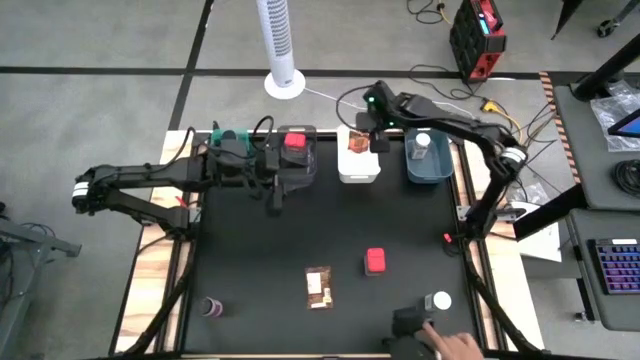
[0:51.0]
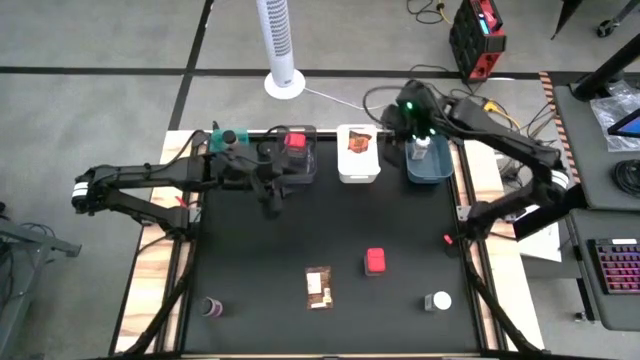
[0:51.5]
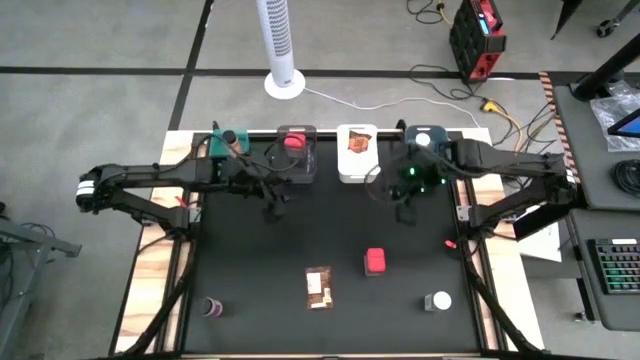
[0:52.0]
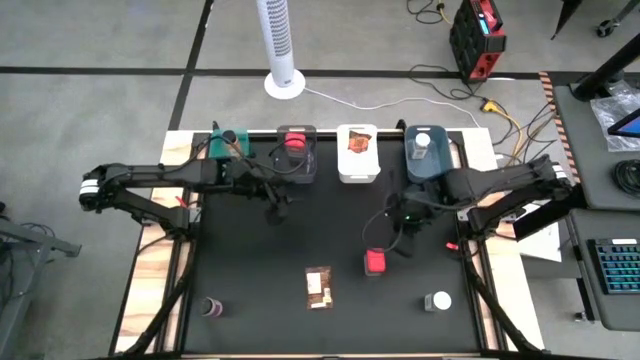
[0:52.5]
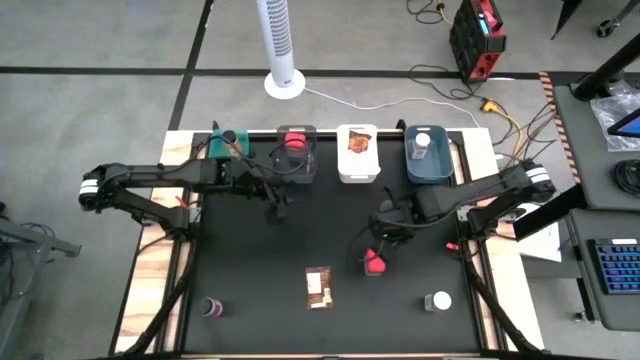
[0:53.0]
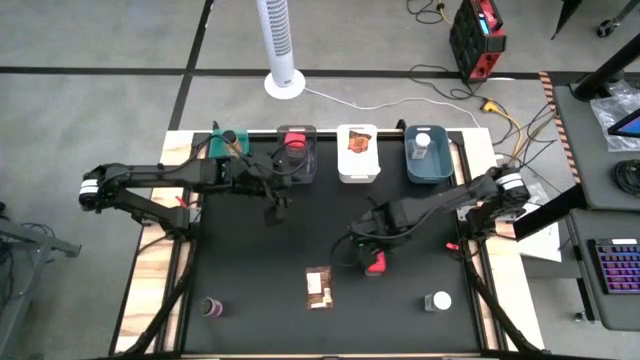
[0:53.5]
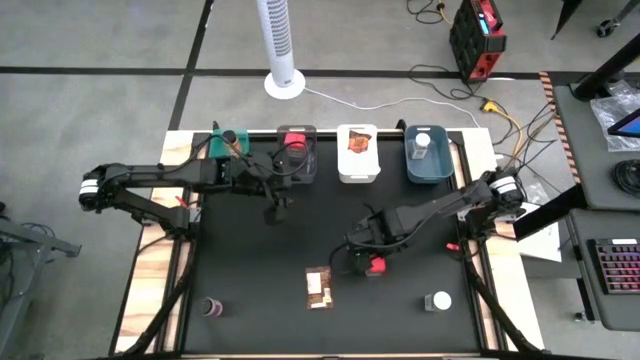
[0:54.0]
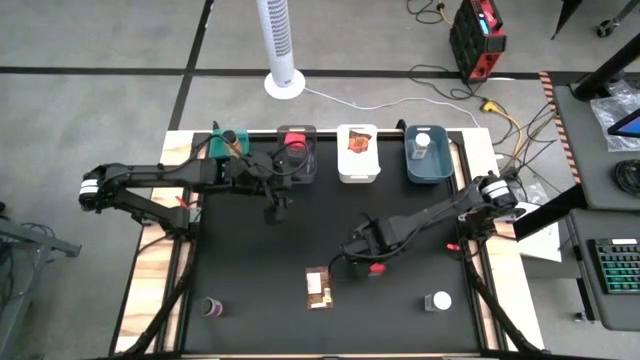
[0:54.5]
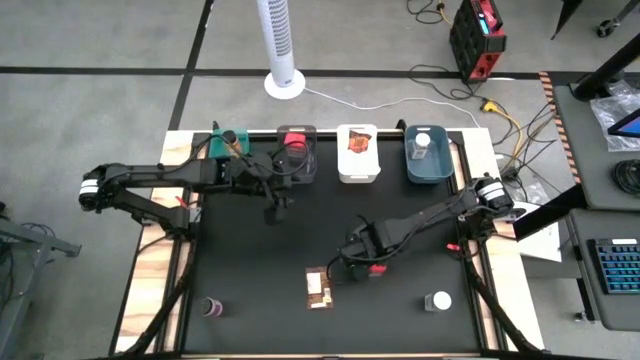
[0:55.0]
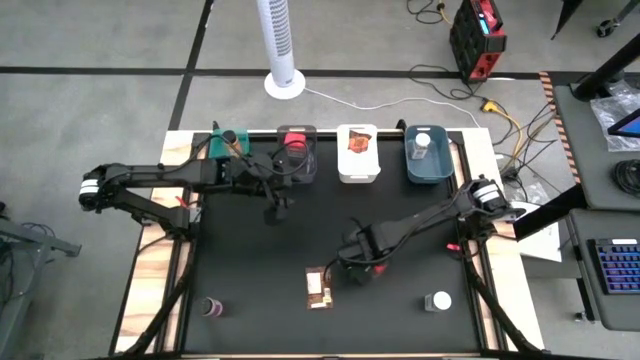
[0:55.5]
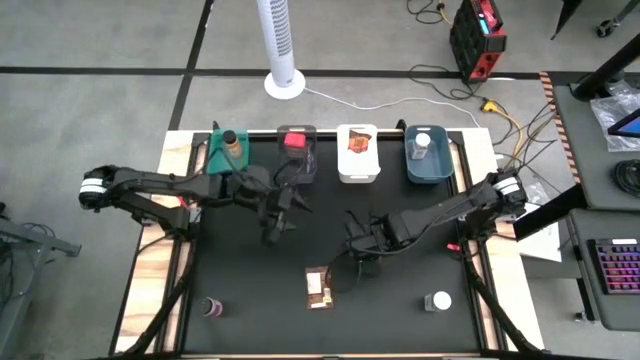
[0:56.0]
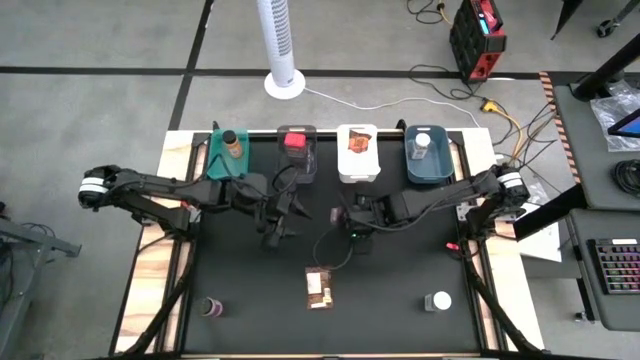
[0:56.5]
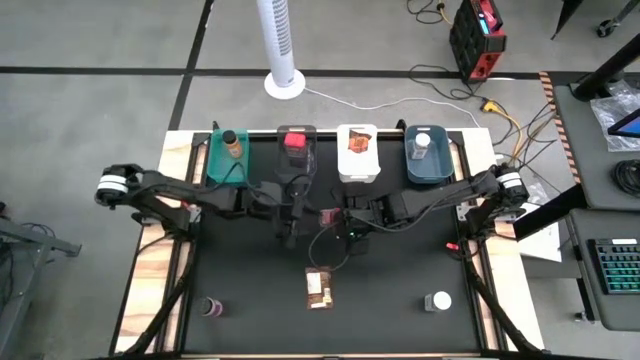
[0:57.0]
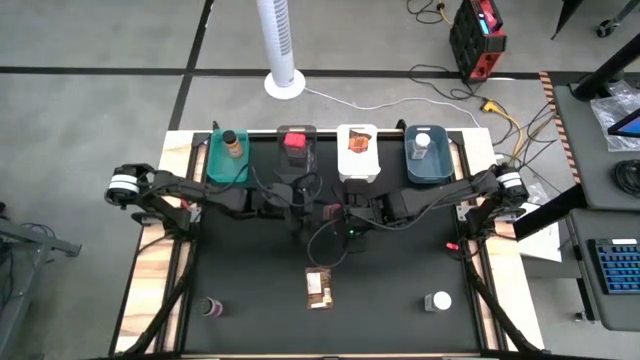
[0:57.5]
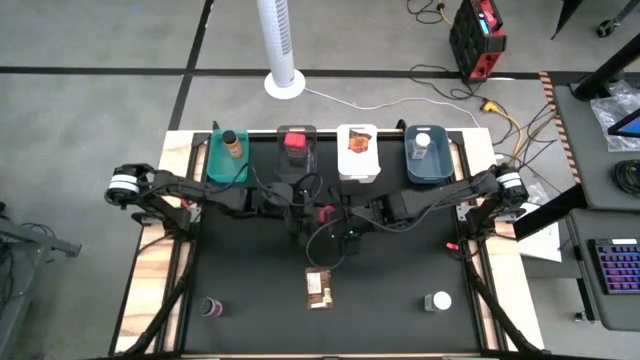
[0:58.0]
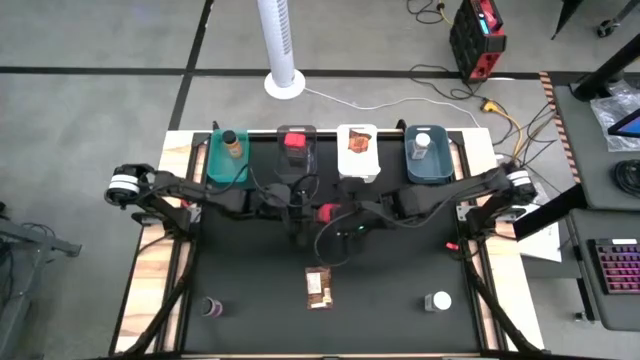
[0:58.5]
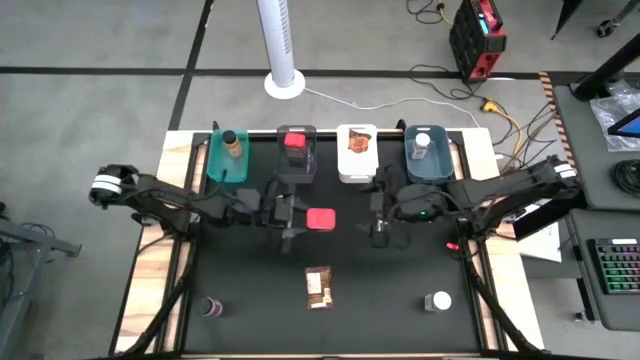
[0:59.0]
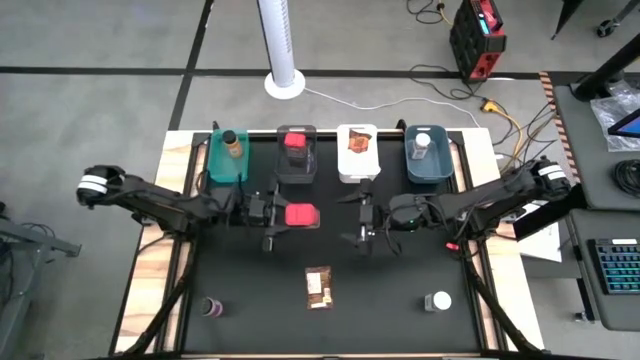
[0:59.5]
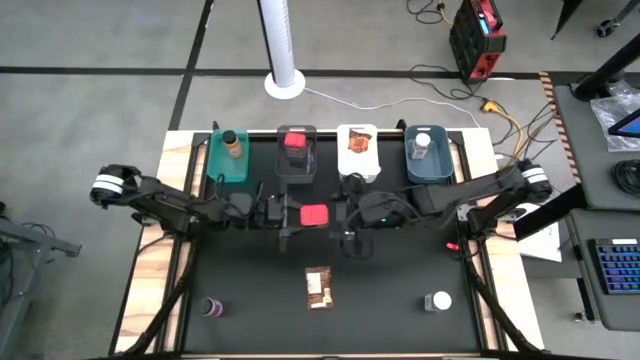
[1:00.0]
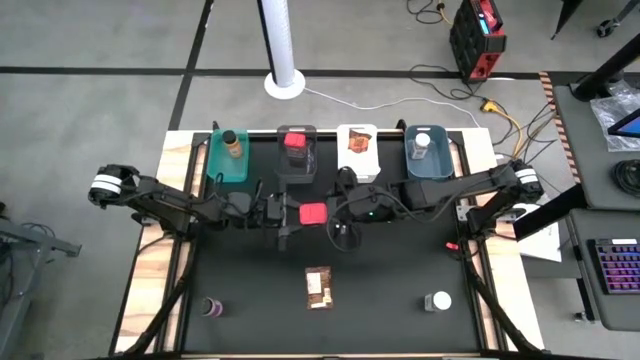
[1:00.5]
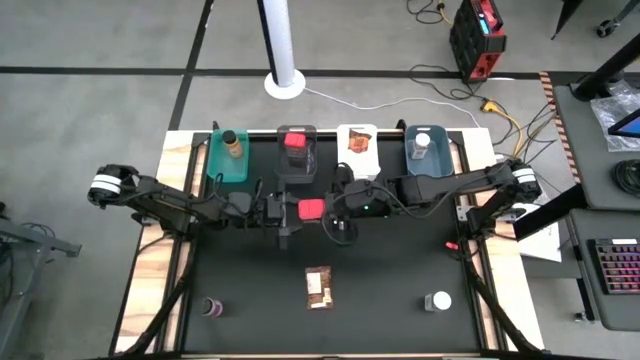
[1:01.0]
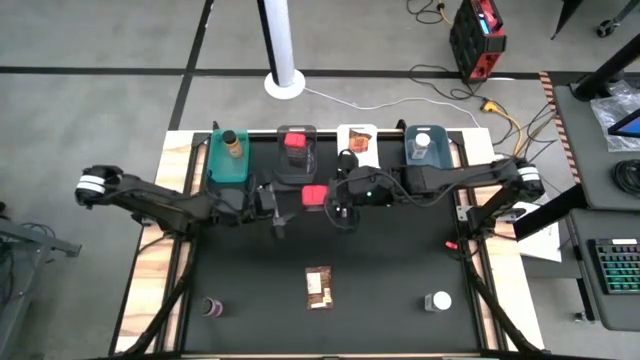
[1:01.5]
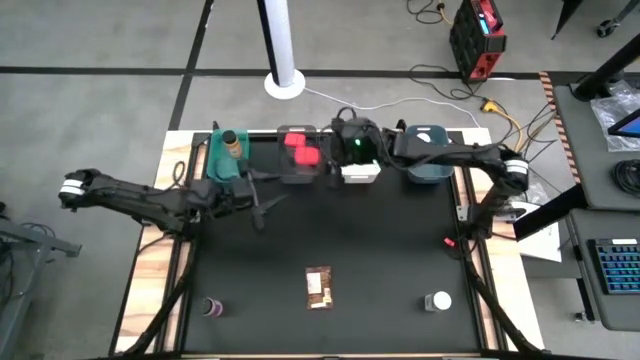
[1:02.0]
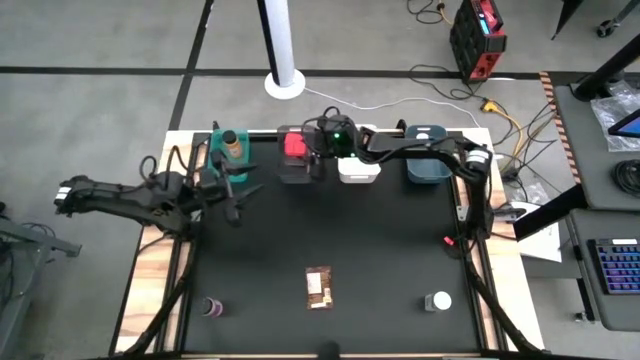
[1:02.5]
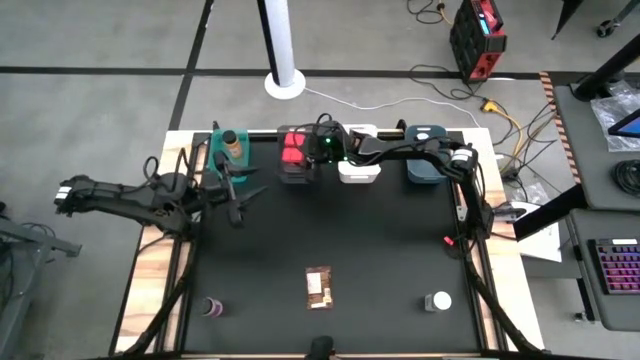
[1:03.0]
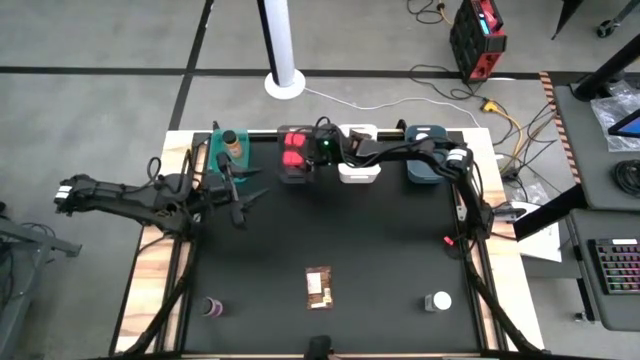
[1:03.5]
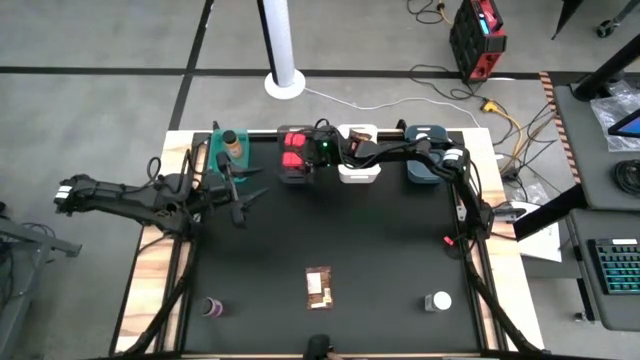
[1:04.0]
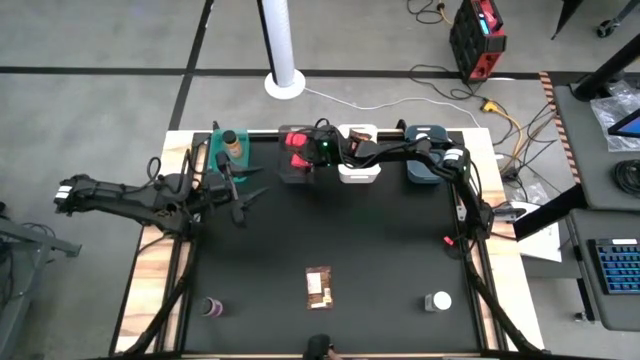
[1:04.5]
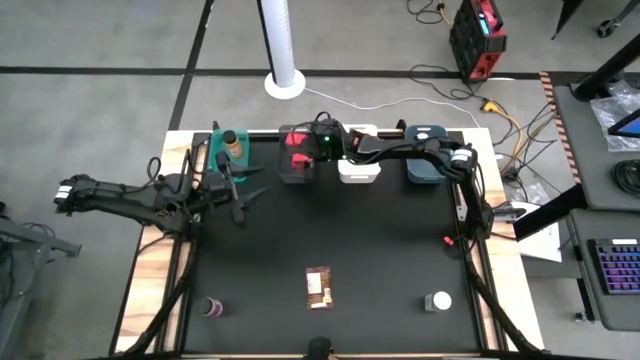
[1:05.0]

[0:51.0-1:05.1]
Task: Sort spices by type
Put the red seasoning can into the black bin

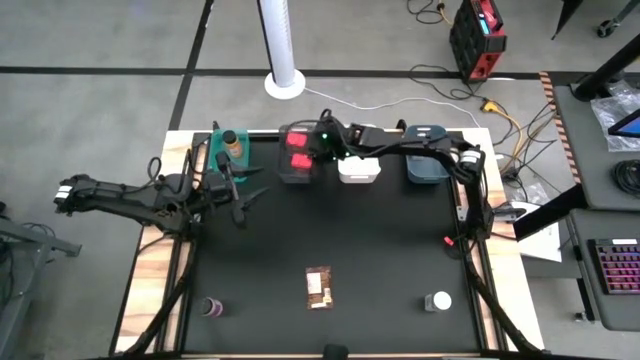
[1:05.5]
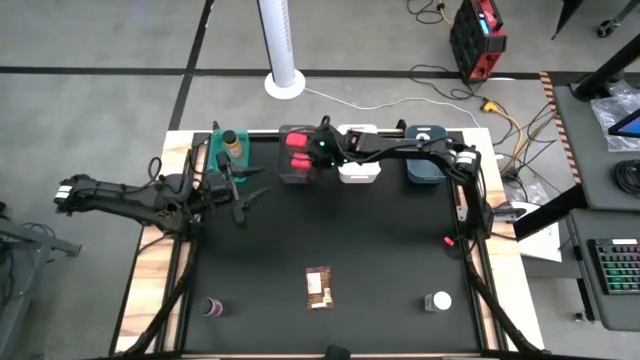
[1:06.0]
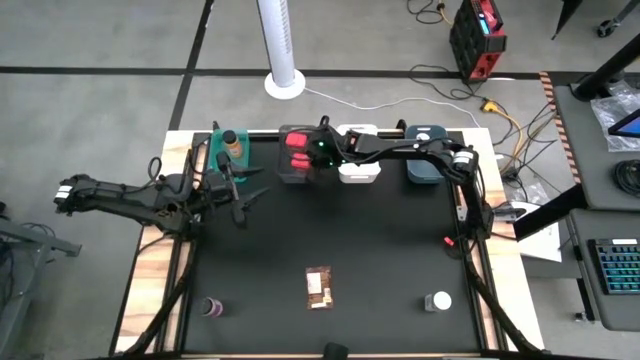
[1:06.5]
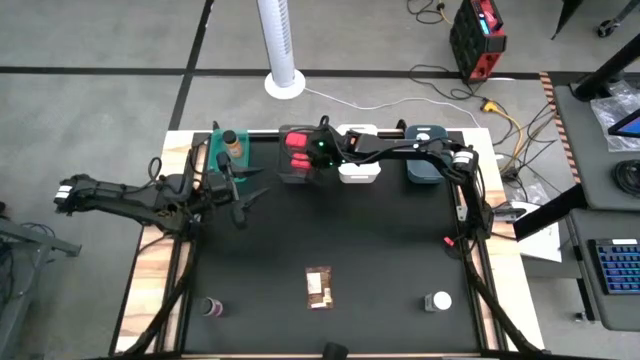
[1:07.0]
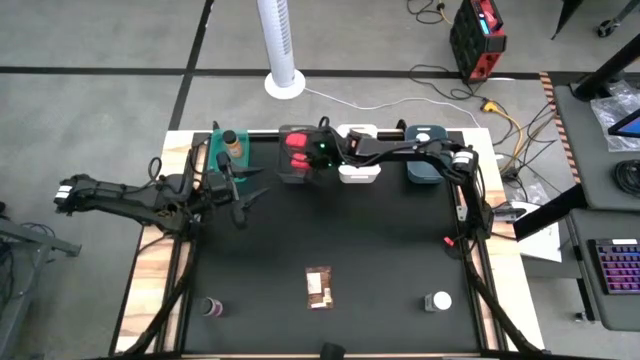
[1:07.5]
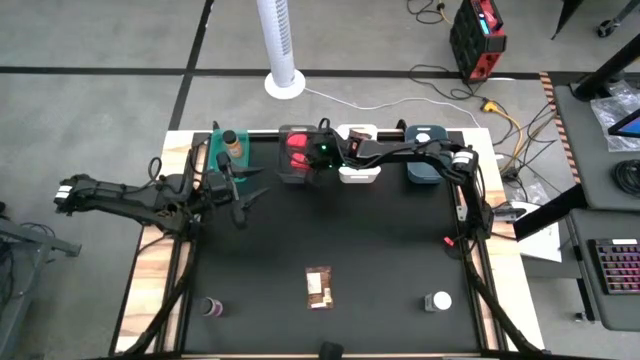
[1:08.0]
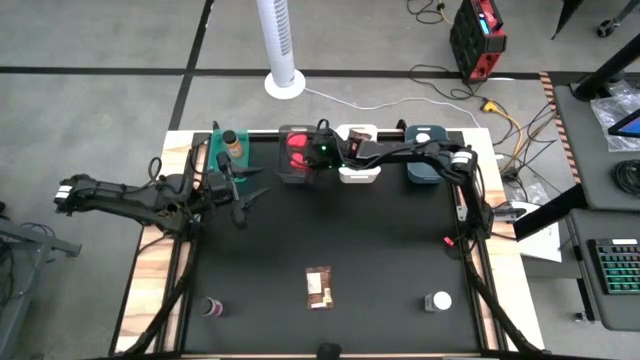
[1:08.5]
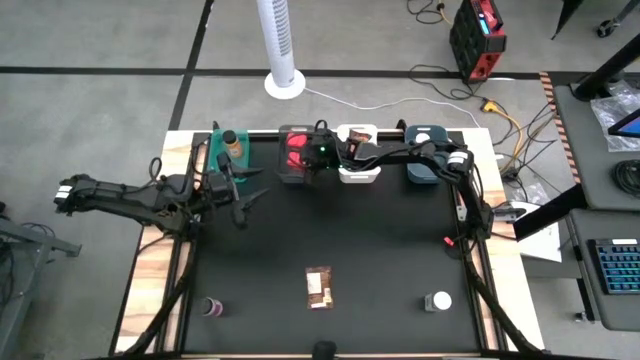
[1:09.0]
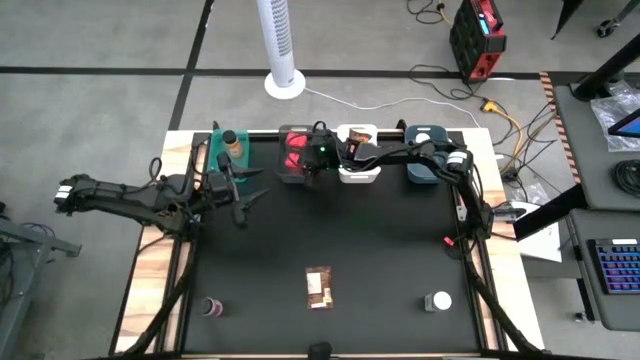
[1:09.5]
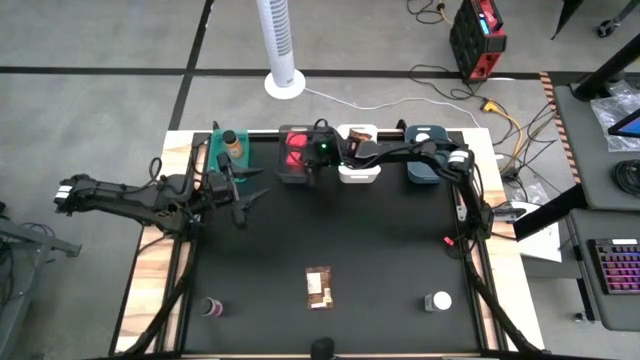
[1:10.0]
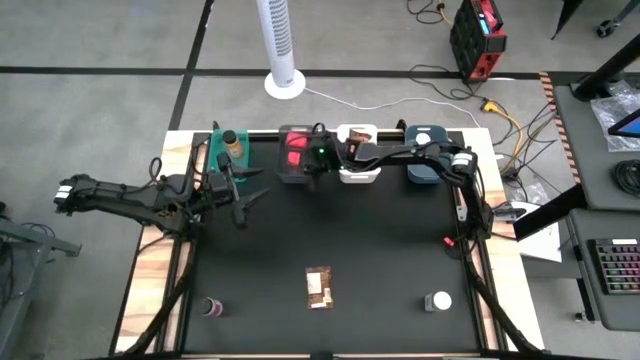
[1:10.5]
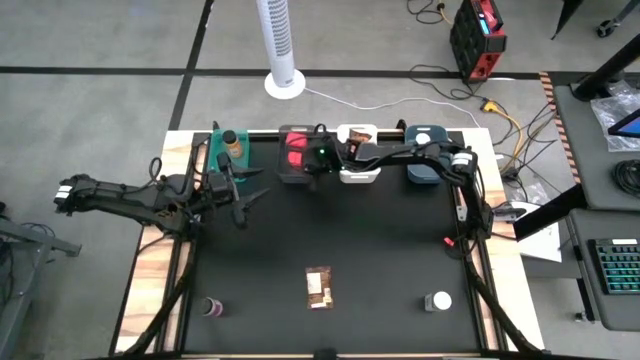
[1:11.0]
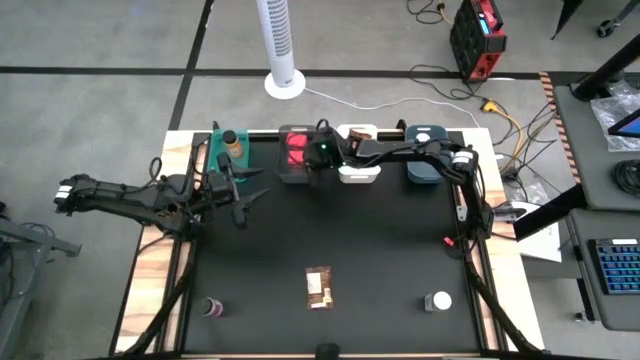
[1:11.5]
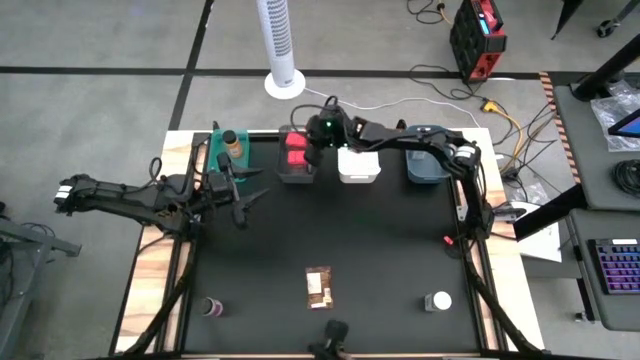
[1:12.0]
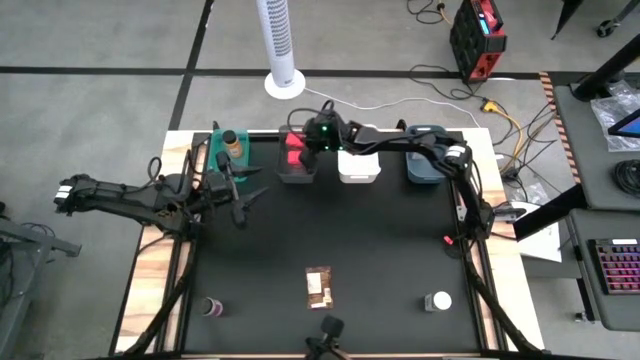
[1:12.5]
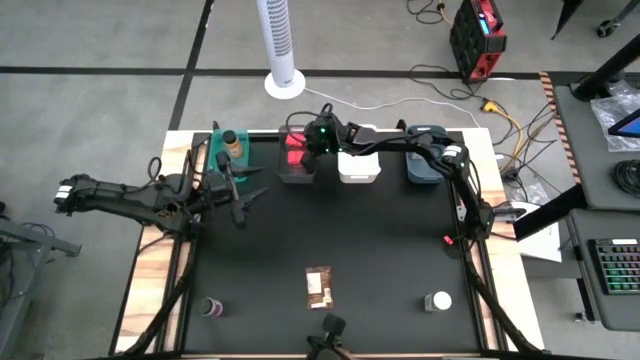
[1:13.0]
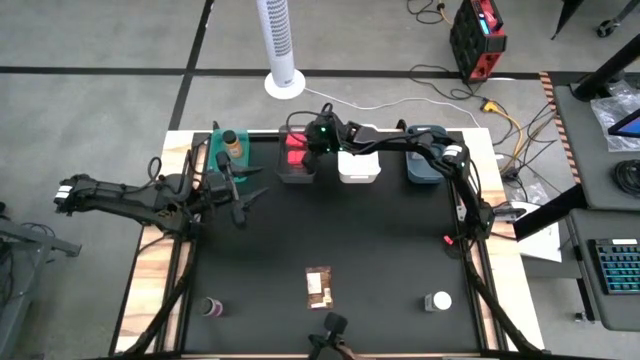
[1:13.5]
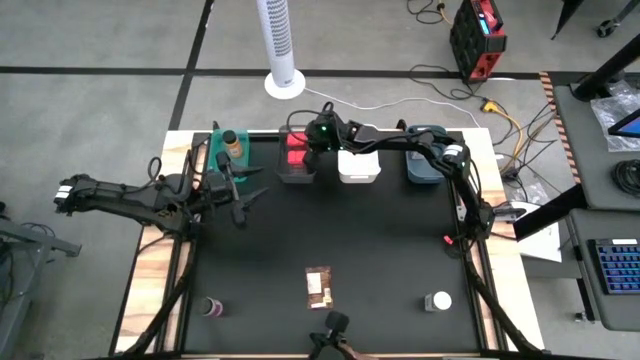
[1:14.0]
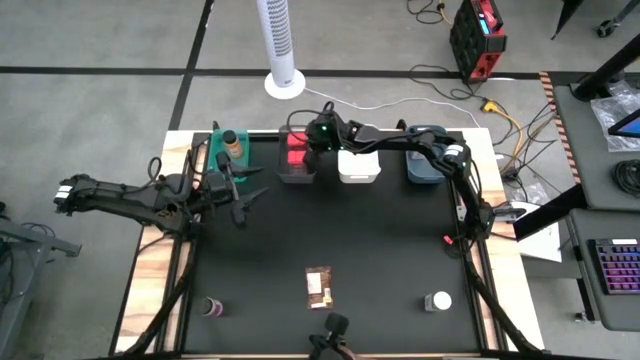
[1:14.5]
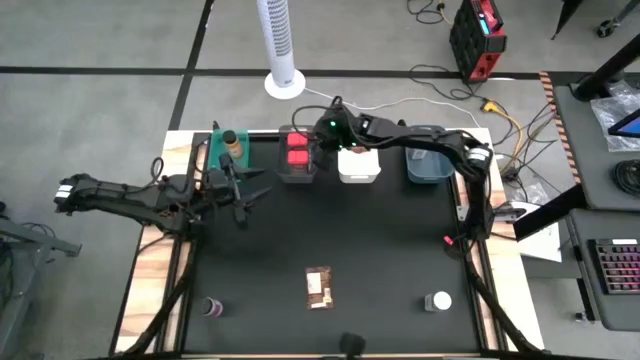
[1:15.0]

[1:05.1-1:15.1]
Adjust the red seasoning cans
